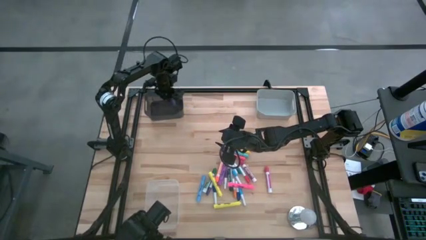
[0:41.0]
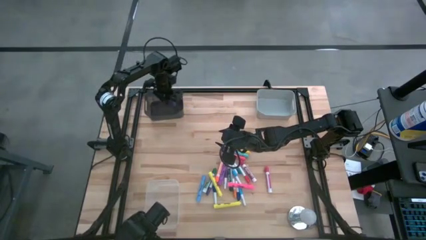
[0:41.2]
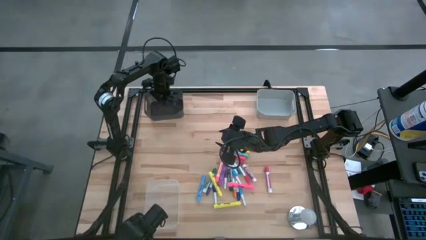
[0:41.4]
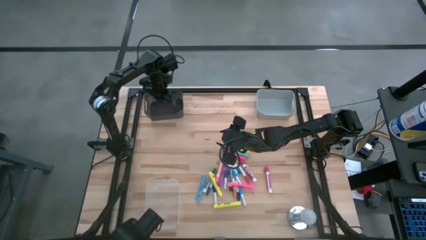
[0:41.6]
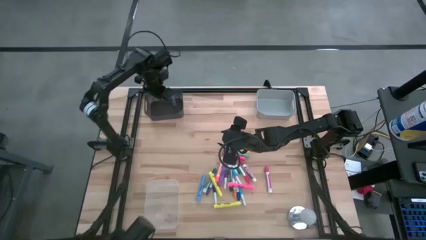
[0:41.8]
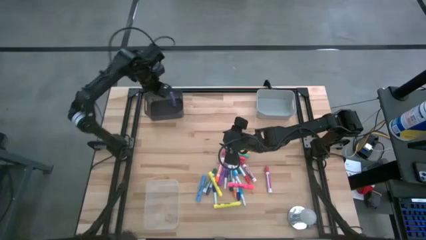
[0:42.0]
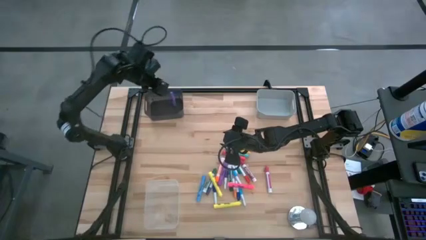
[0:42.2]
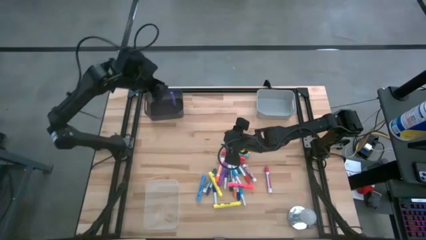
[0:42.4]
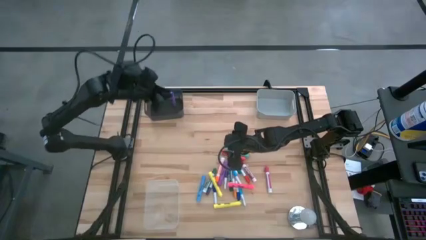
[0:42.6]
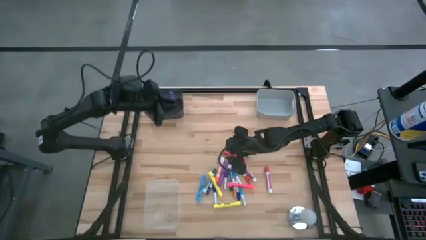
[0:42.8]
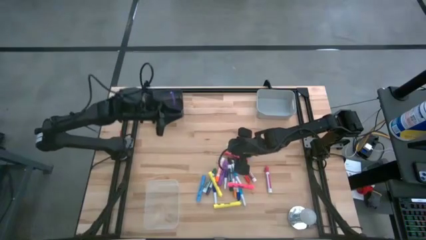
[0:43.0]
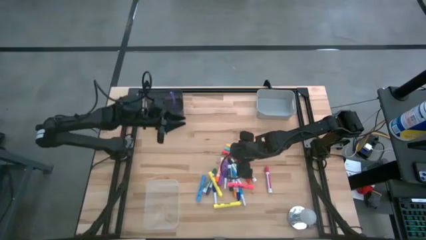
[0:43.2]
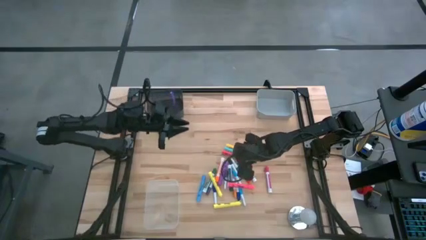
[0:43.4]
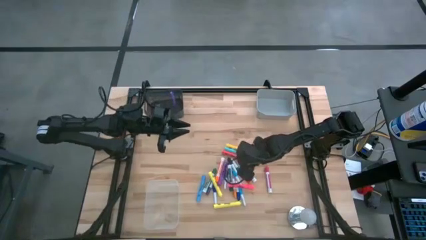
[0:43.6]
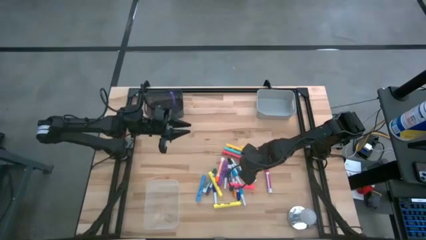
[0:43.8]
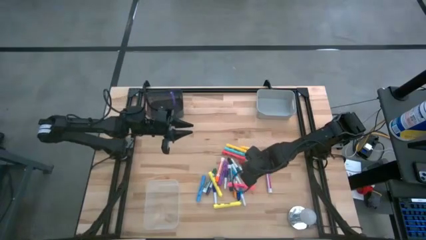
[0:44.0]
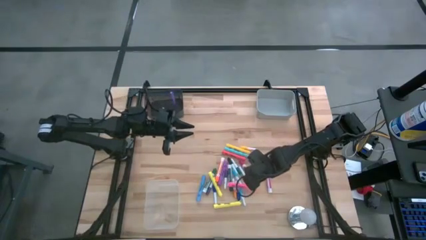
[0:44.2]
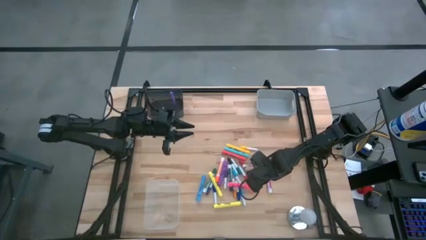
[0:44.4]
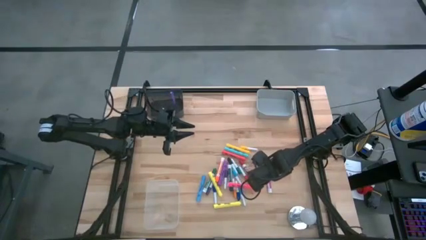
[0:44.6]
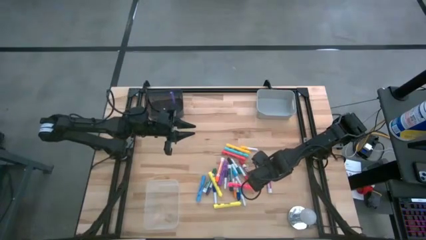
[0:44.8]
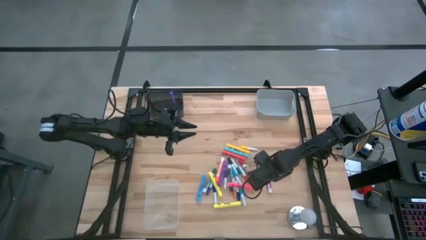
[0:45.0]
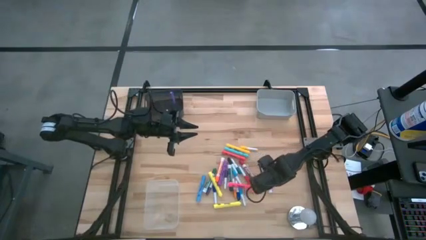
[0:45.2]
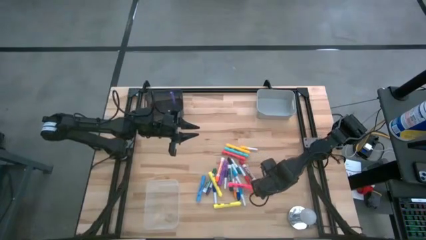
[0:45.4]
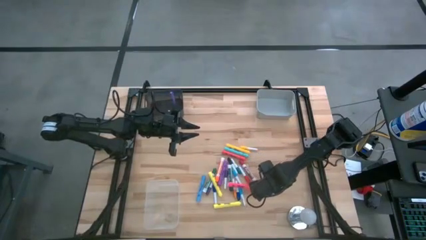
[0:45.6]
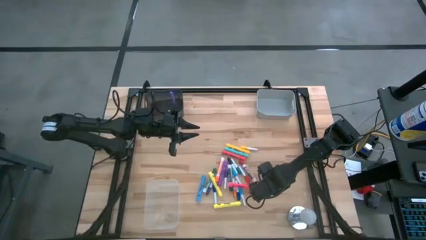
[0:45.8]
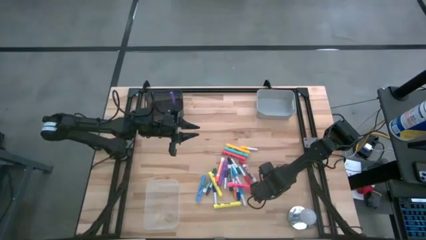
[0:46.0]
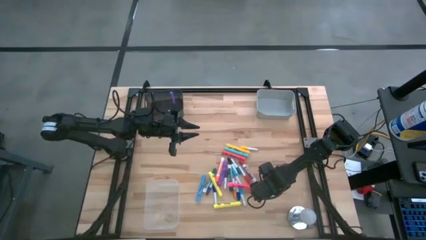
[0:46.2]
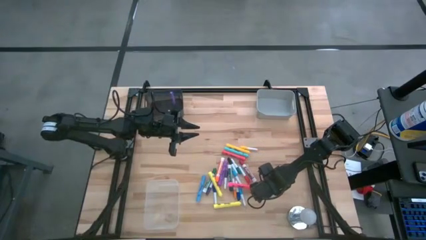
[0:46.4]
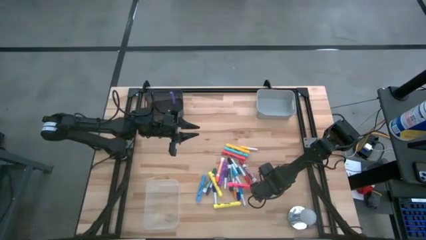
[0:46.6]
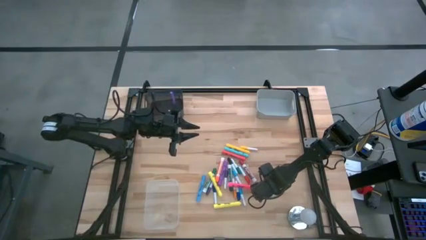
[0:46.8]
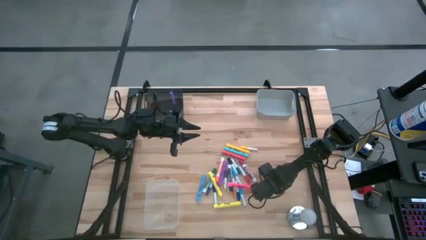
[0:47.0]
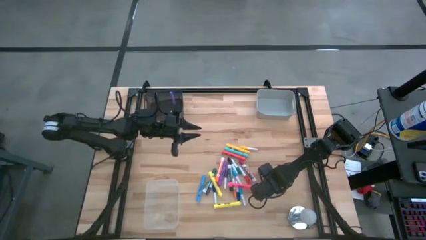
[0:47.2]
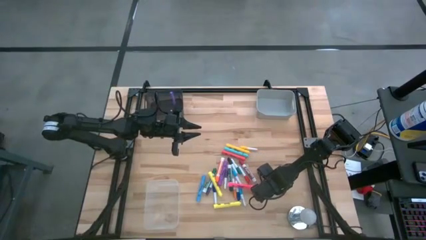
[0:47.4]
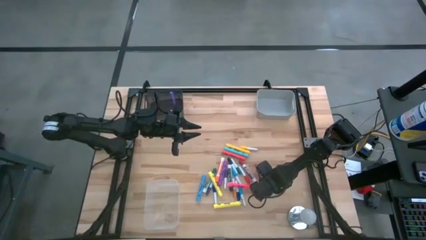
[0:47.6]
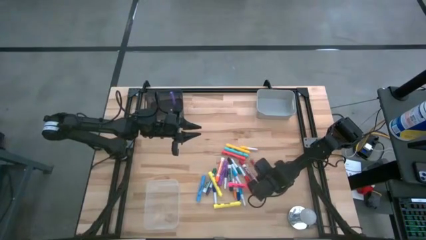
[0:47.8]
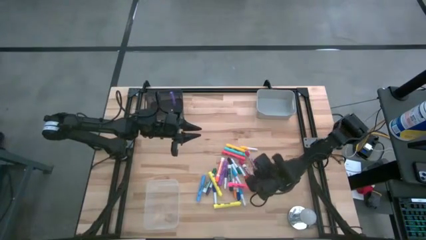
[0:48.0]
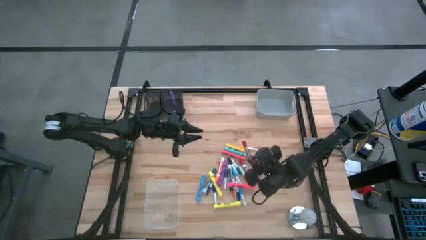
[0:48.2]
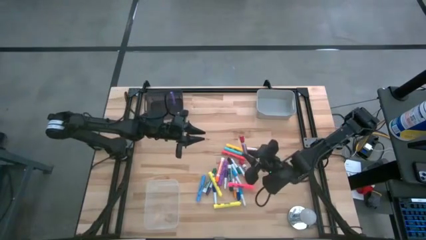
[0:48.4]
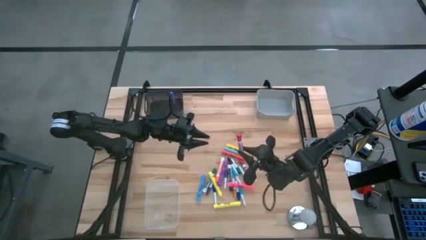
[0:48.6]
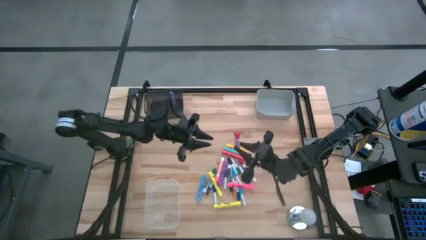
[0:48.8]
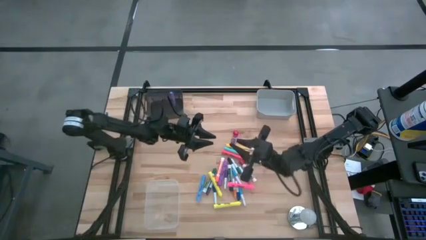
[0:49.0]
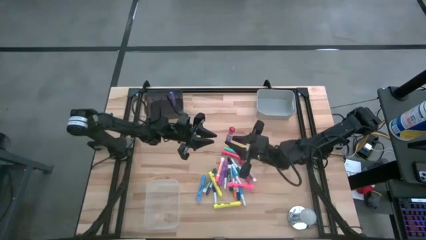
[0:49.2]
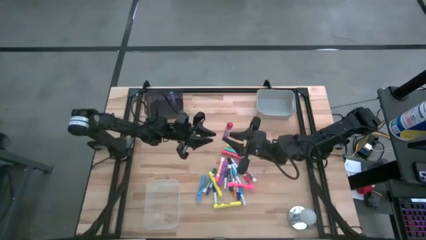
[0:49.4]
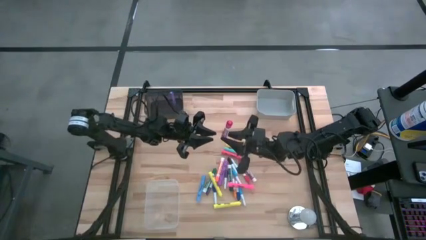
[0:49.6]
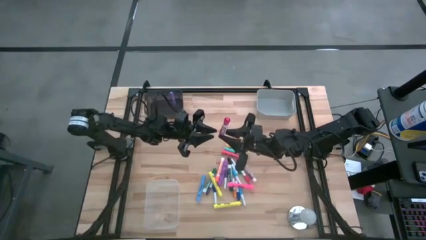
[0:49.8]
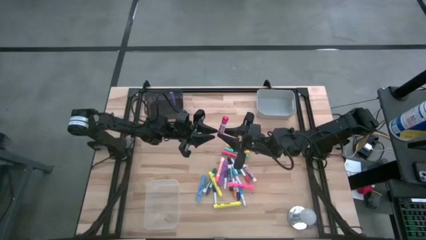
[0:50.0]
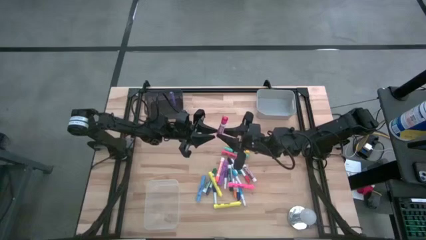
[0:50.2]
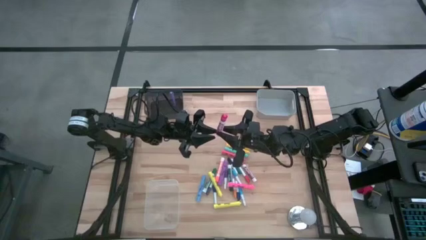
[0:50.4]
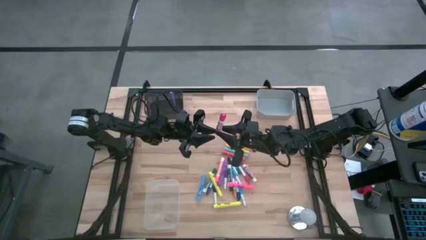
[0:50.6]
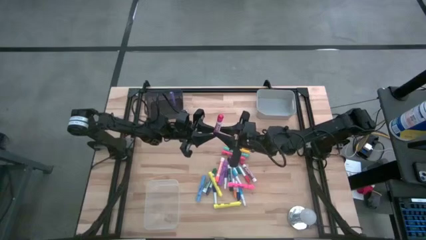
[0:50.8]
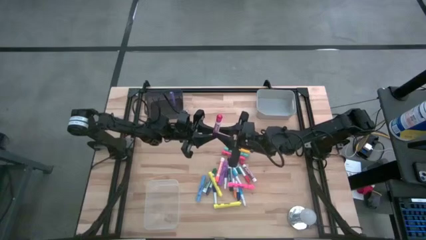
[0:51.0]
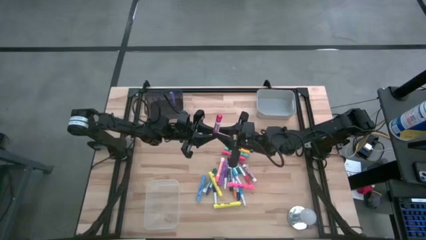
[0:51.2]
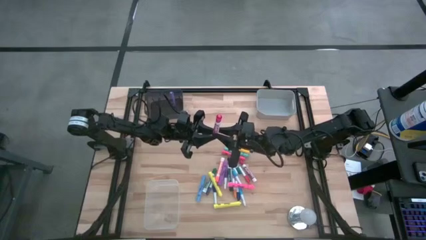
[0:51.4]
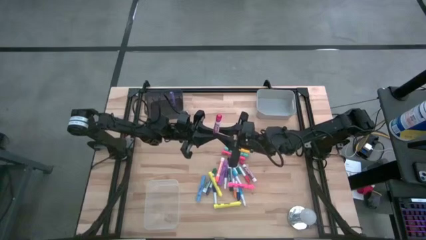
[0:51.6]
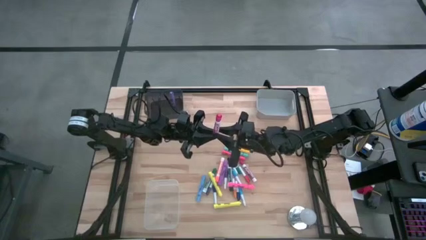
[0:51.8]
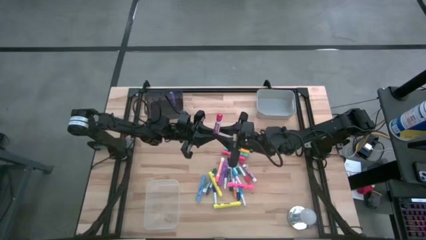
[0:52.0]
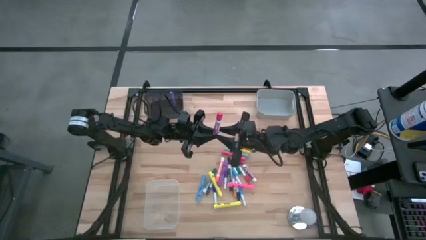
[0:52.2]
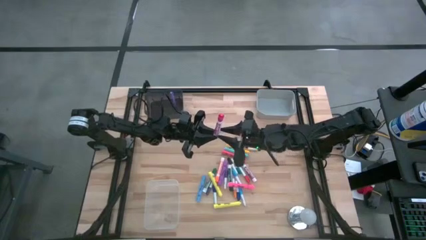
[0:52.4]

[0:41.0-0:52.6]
Task: Pick & Place Markers
Put the pink marker pen into the gray bin

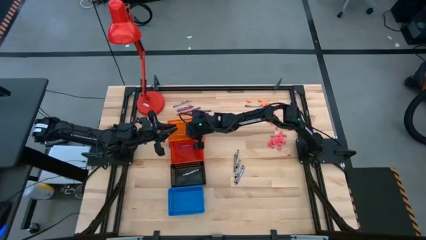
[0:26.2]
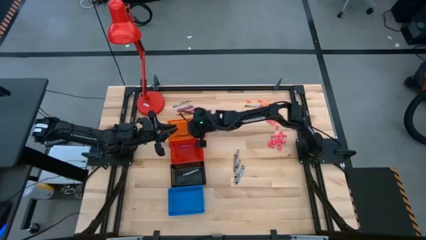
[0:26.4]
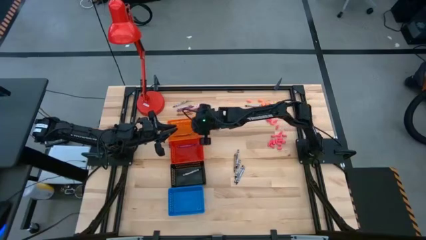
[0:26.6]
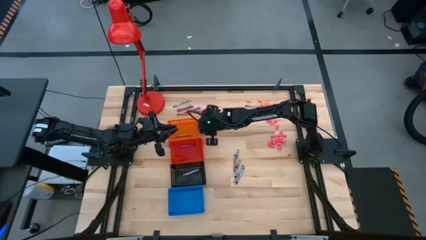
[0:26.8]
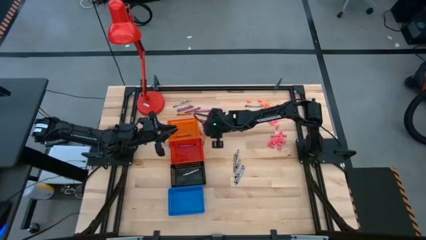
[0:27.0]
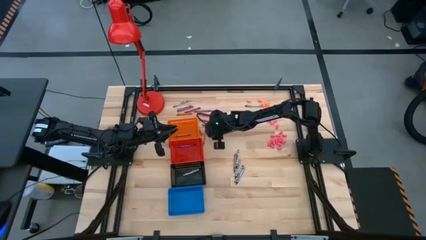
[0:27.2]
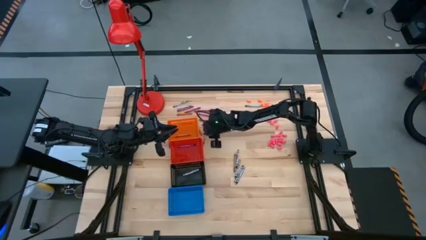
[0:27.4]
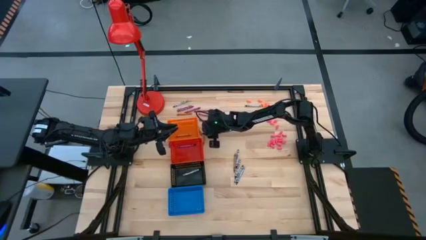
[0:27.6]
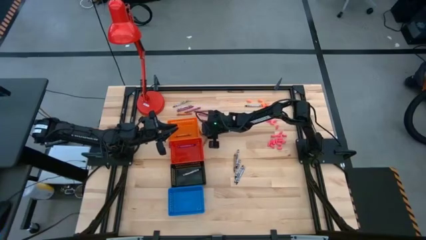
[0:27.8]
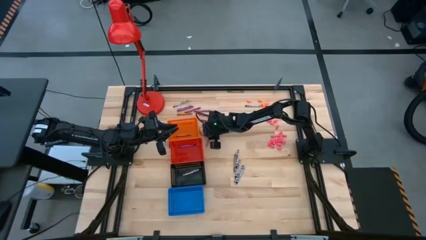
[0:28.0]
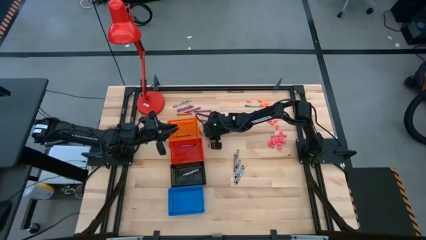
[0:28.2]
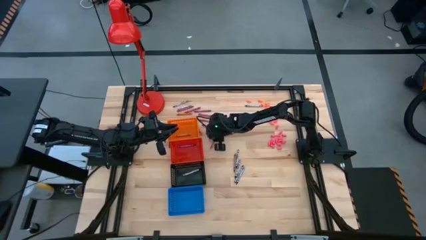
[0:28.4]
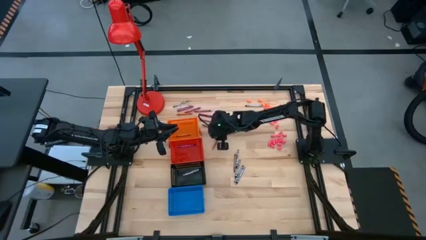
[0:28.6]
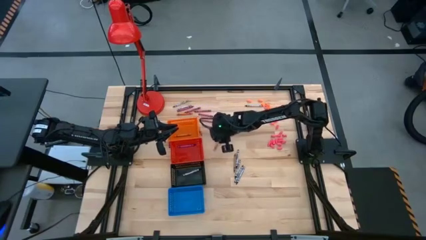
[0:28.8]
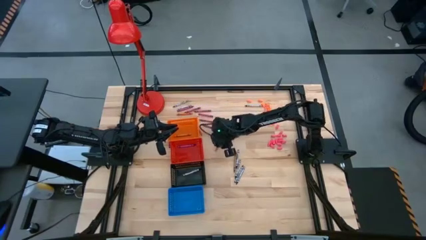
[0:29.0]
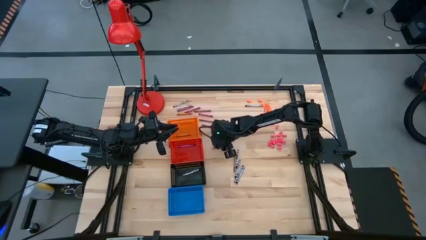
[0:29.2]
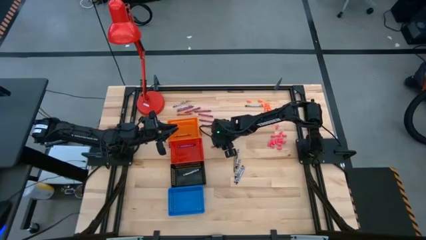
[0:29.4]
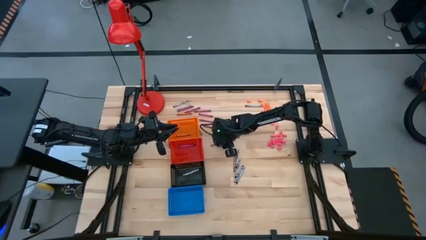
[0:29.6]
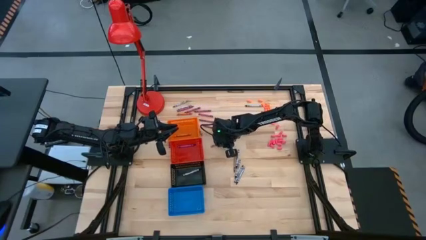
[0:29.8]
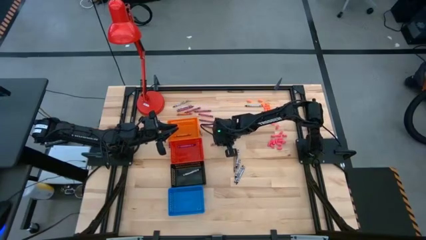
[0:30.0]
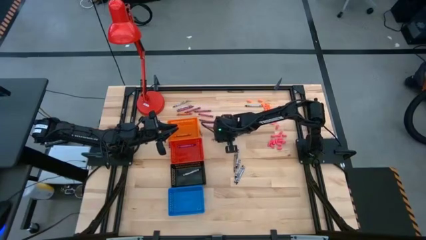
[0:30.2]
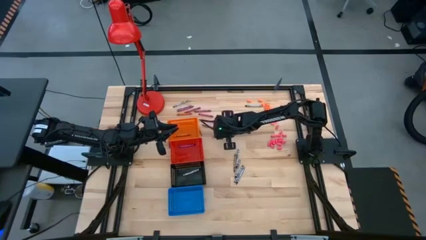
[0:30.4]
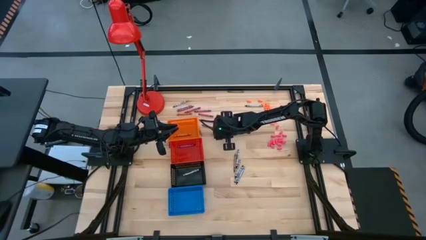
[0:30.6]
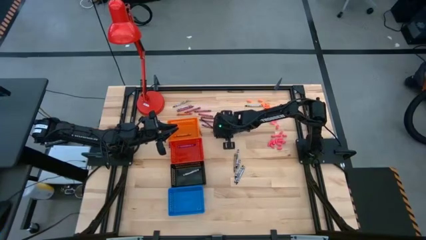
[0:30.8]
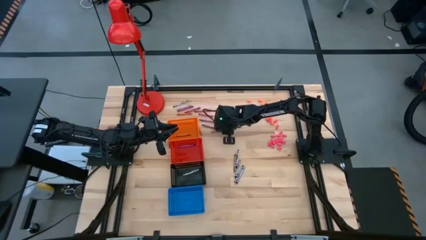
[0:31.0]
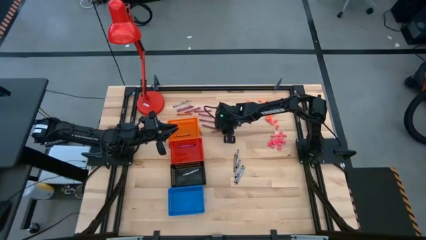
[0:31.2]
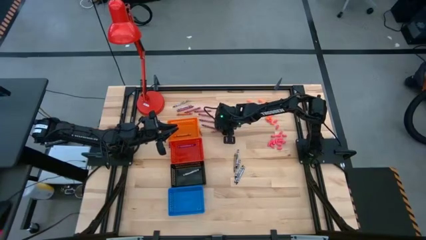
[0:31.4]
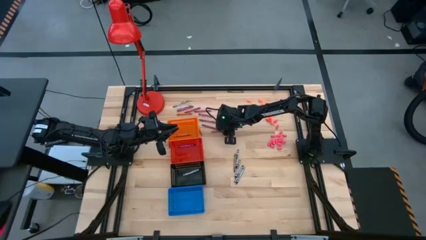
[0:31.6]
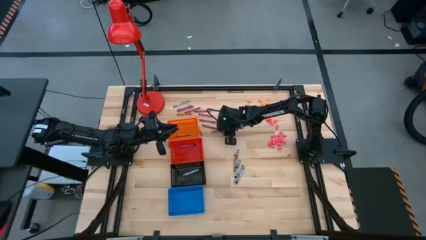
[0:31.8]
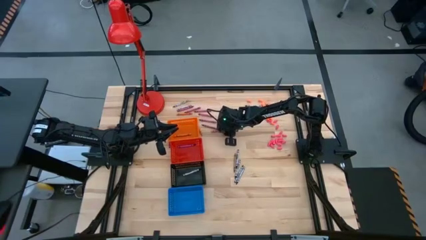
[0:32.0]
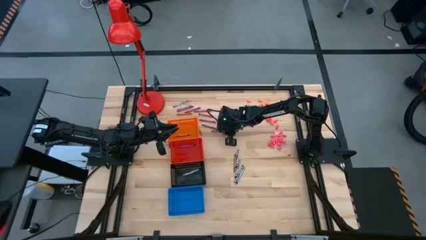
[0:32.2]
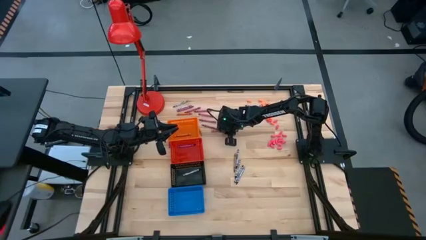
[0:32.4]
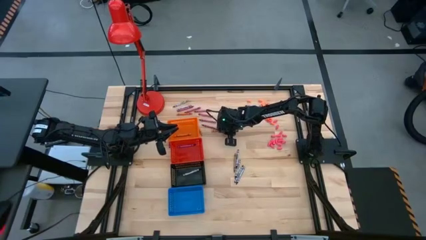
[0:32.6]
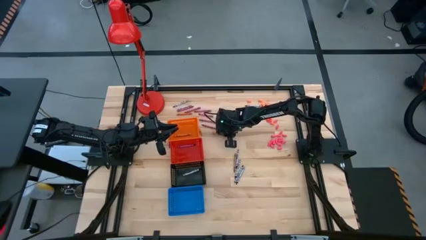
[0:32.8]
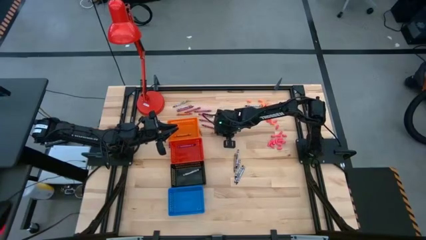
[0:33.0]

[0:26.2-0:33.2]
Task: Sort crayons
Put the orange crayon into the orange basket
